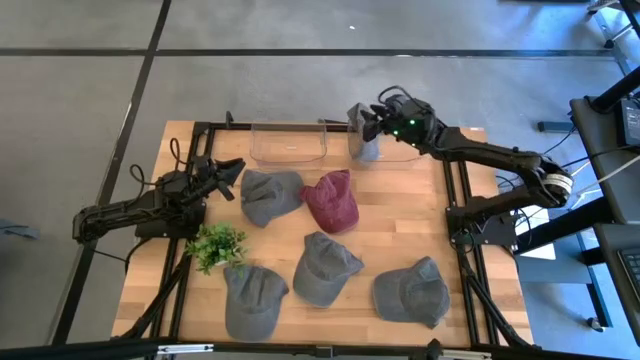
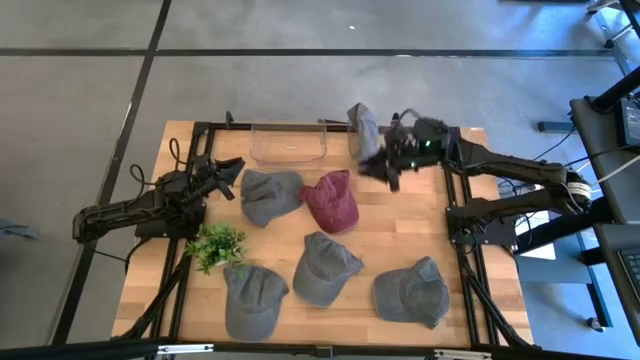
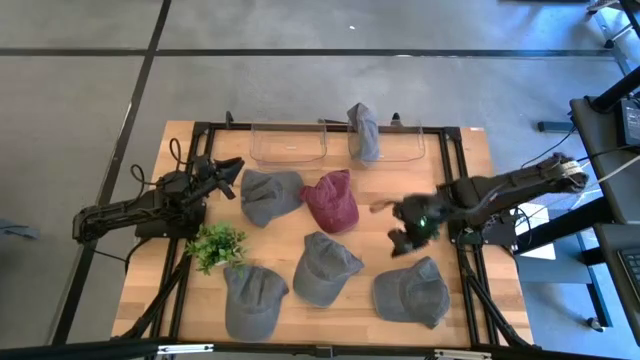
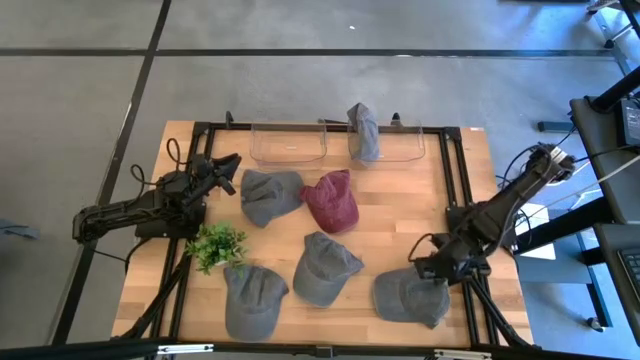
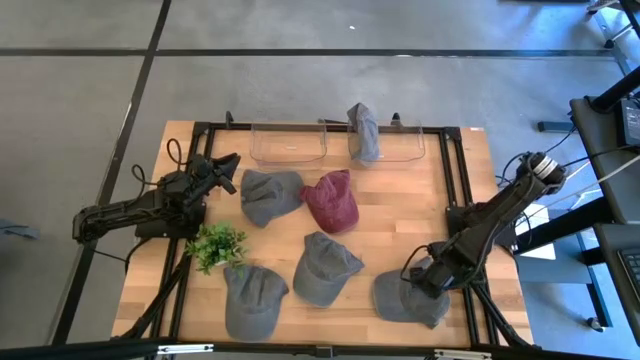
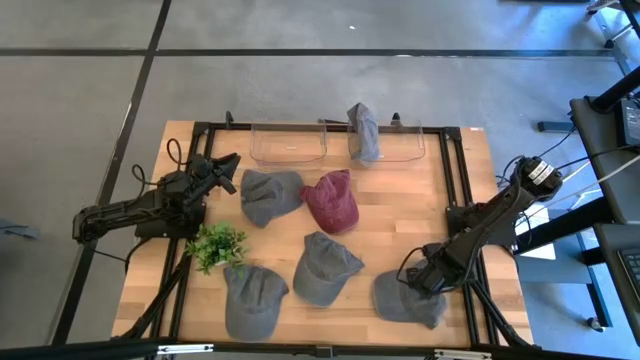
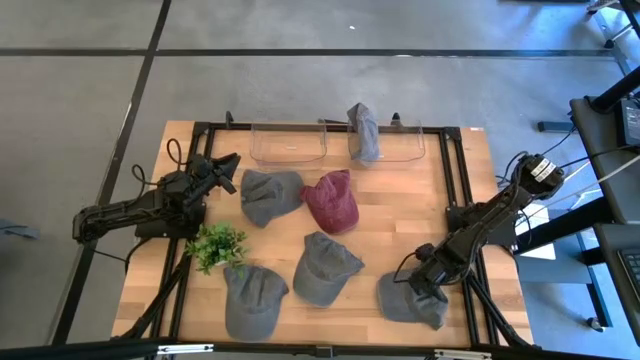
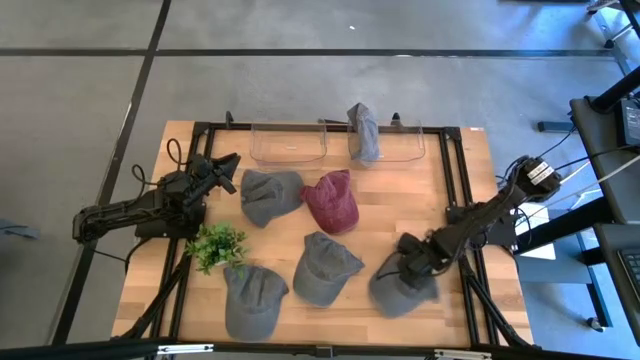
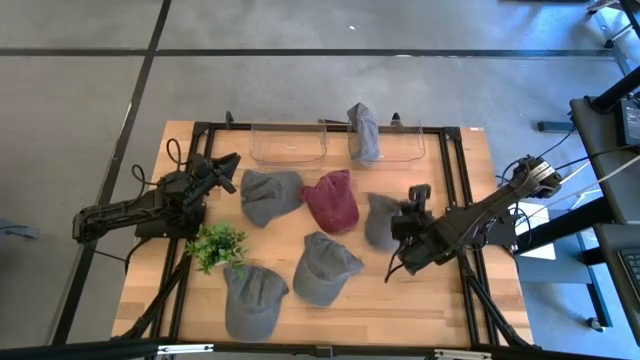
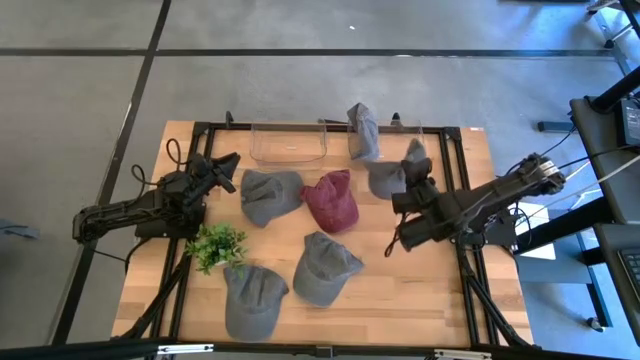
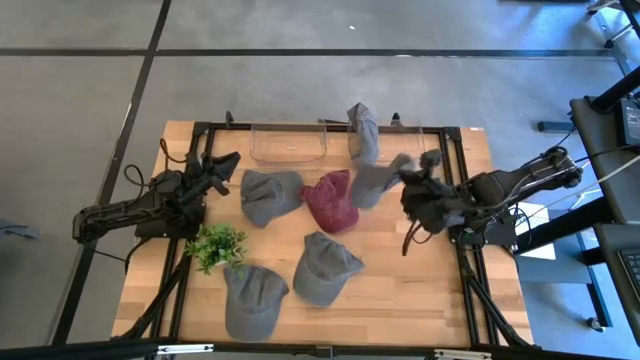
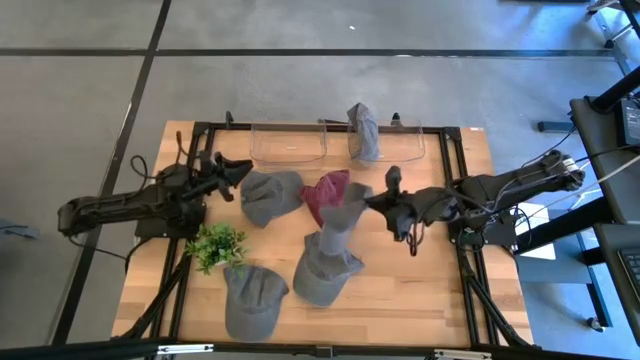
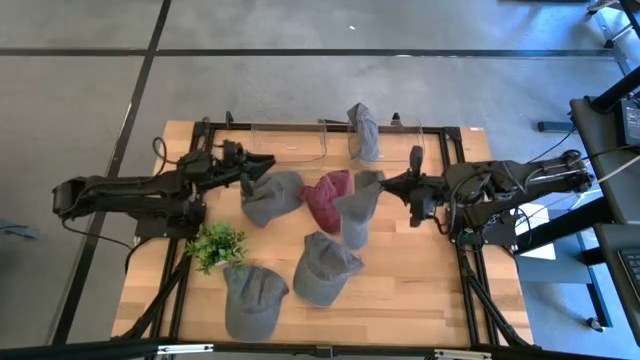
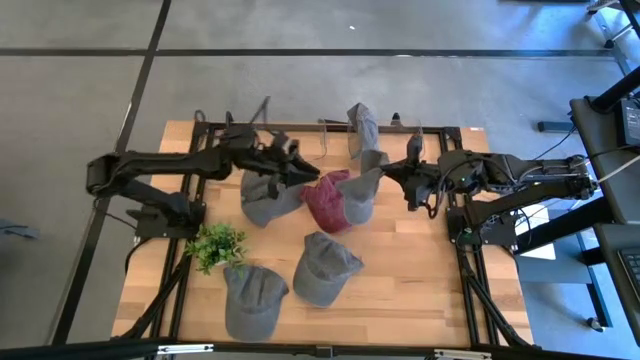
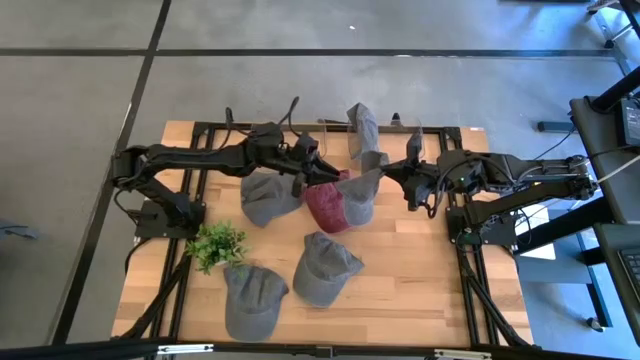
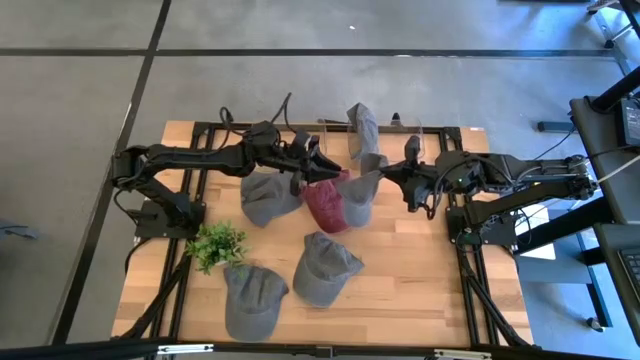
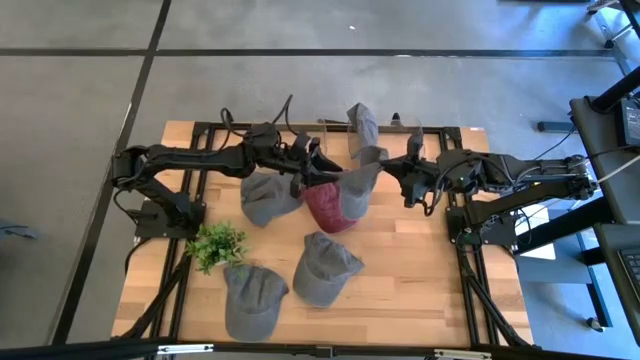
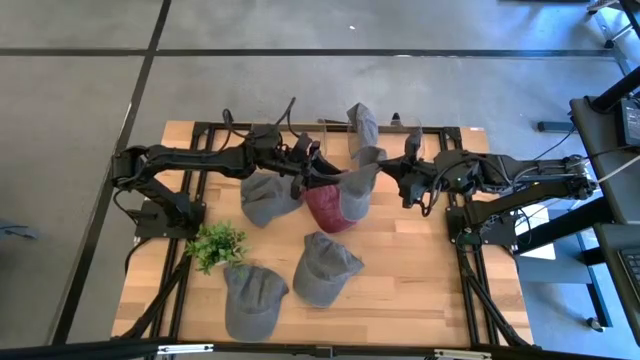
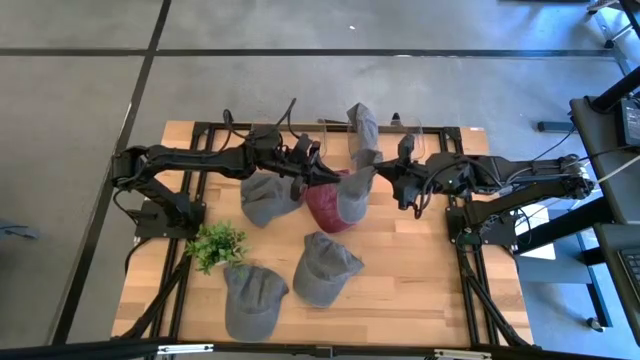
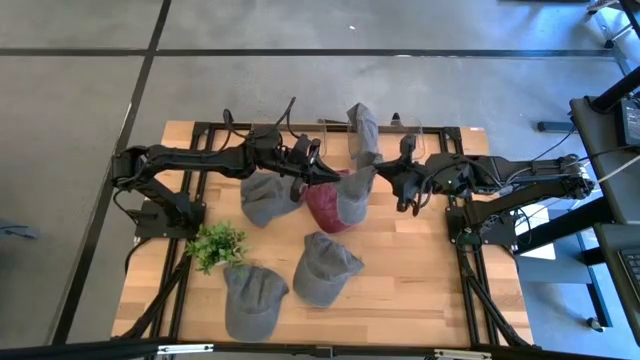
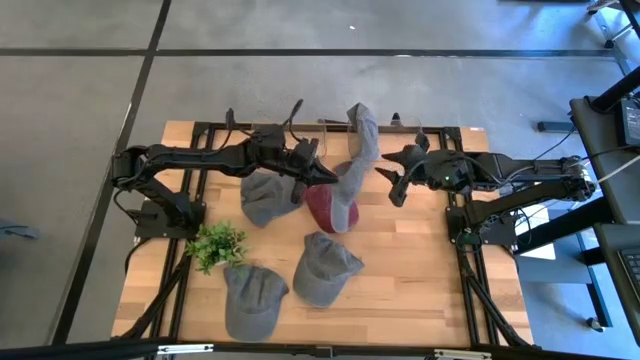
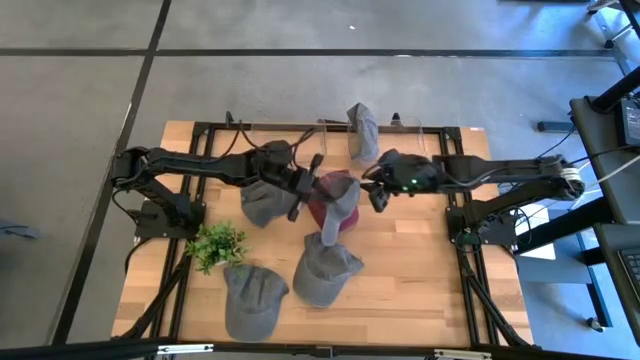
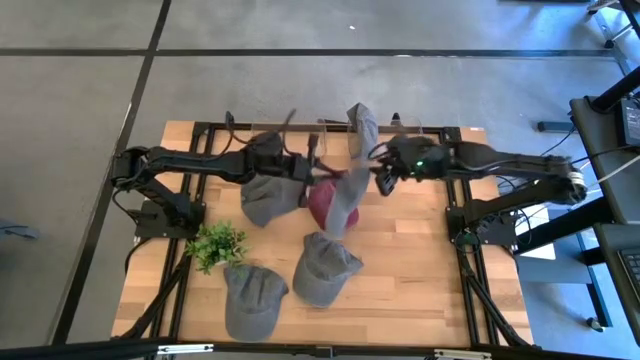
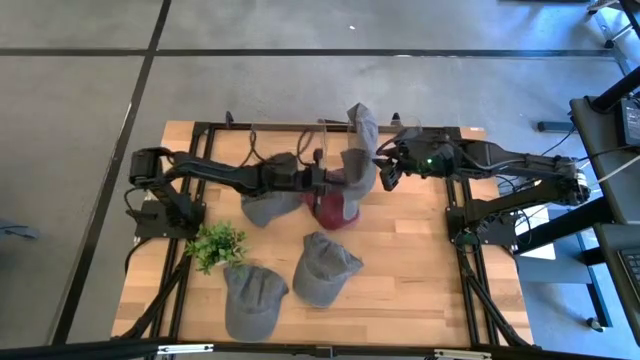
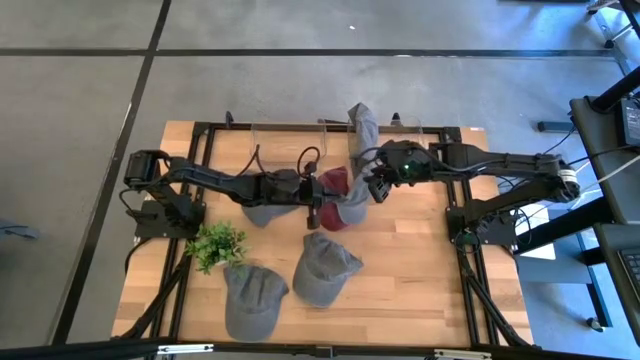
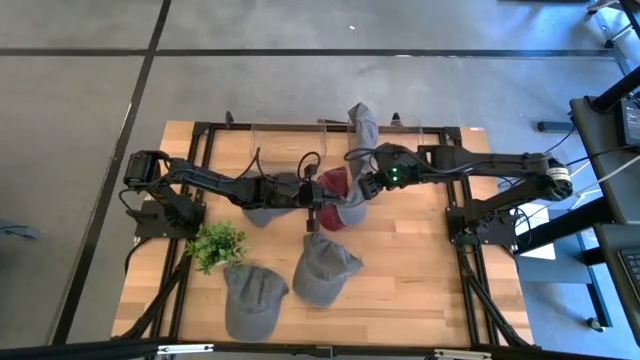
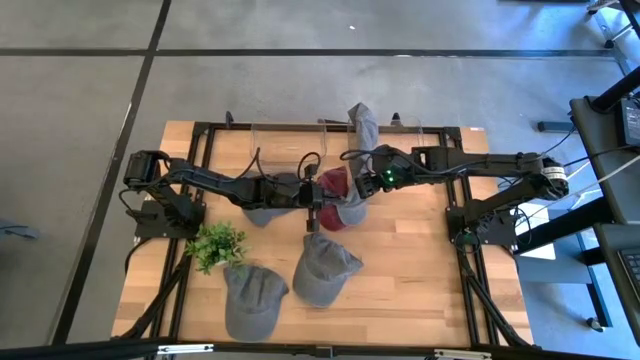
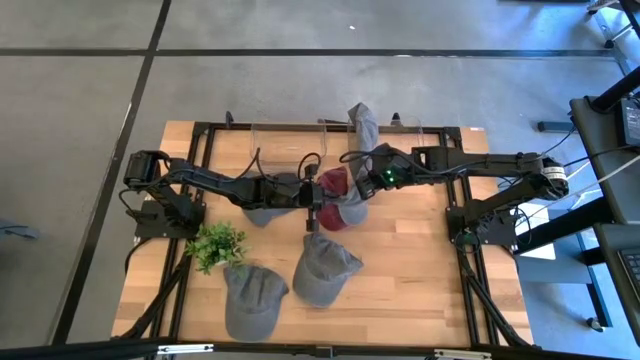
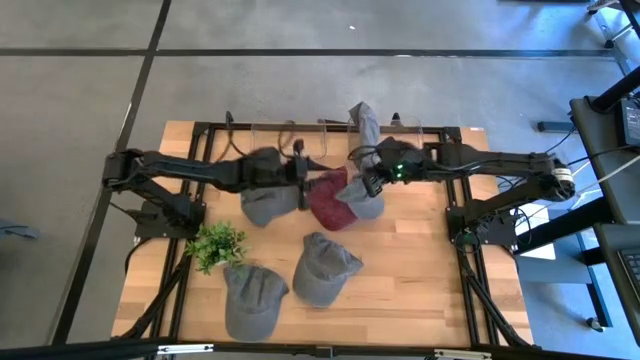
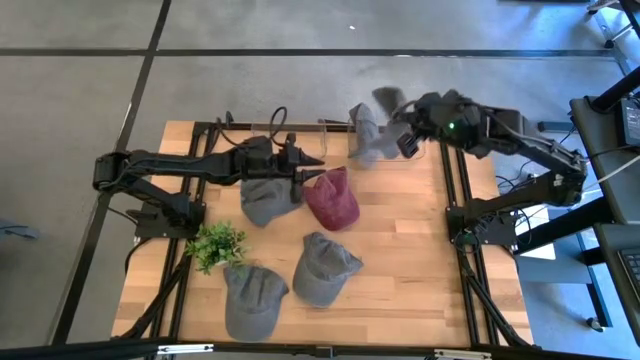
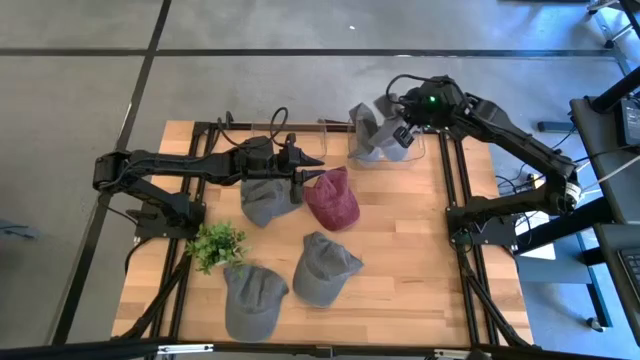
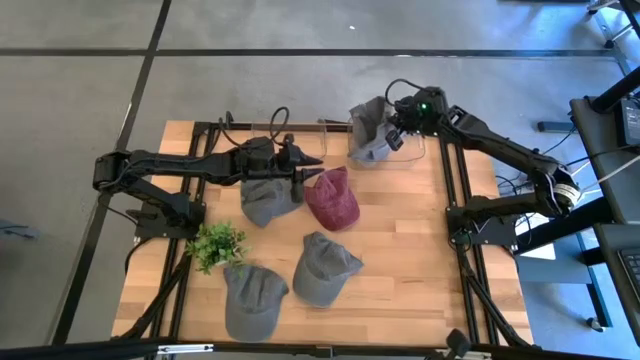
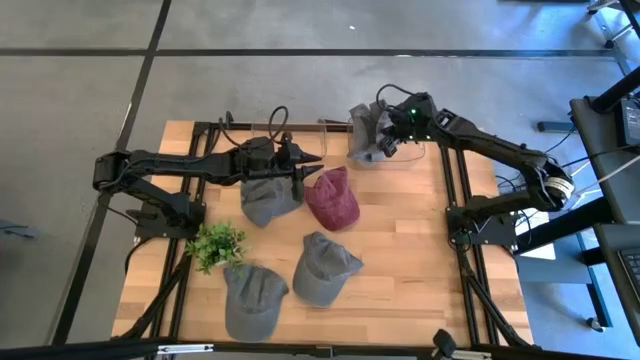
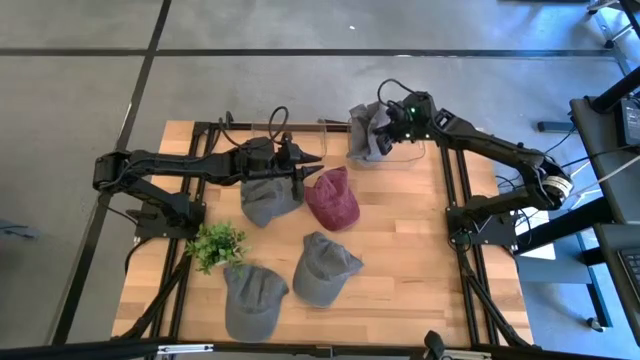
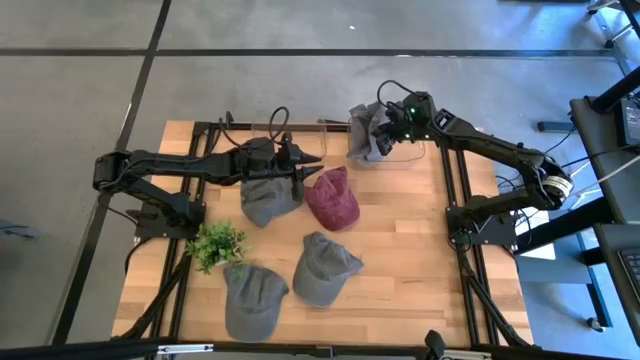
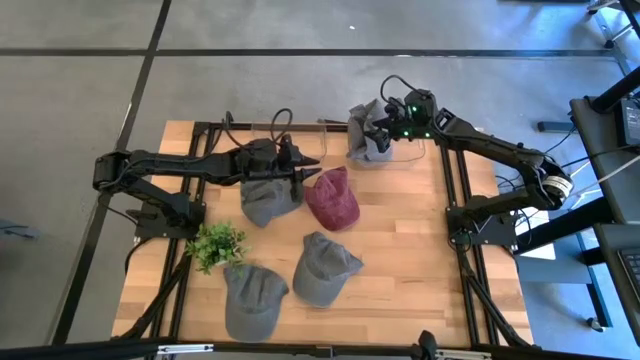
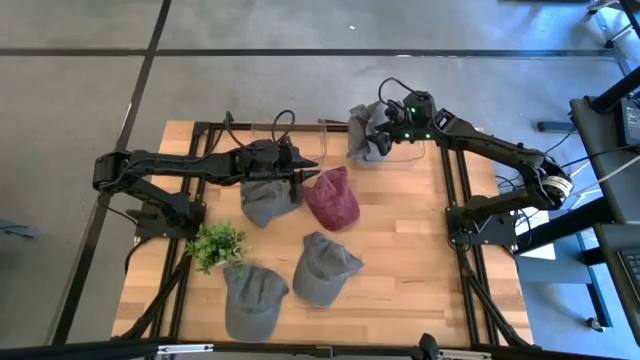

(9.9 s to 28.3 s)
Task: Pick & Place hat
Put the gray cap into the right transparent bin

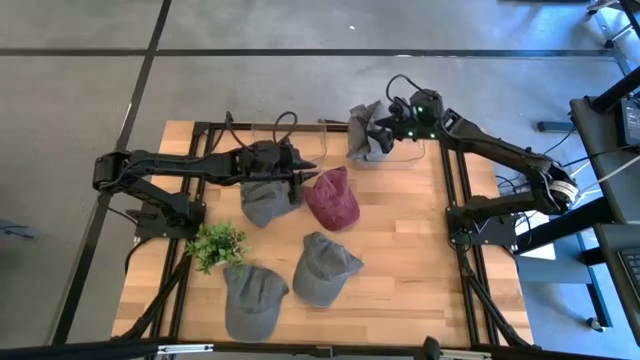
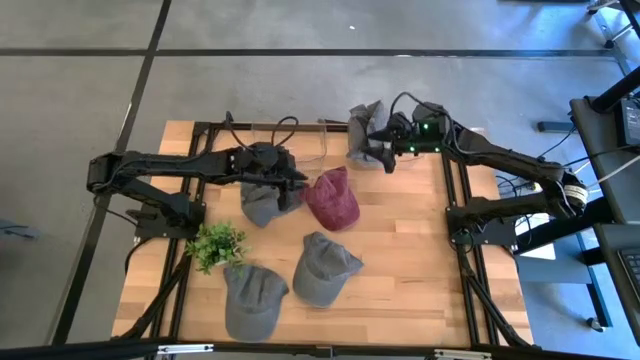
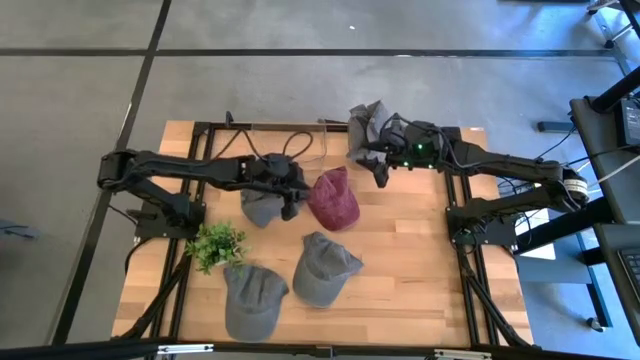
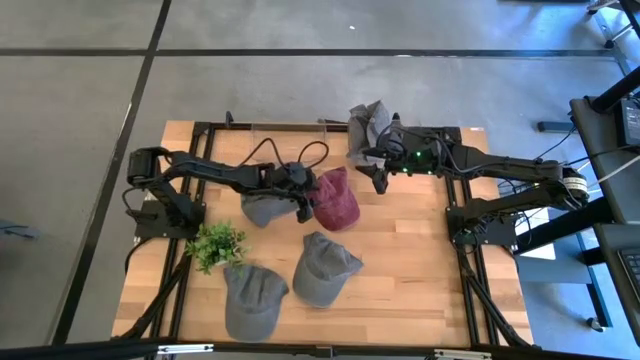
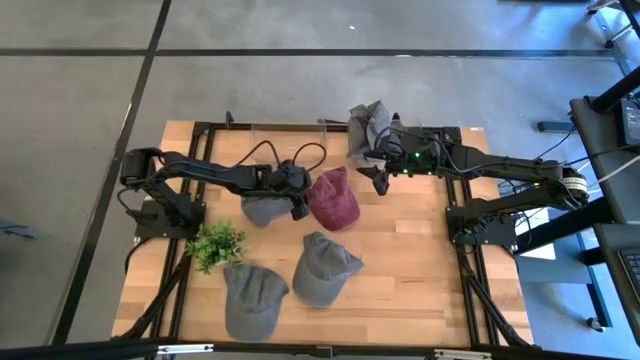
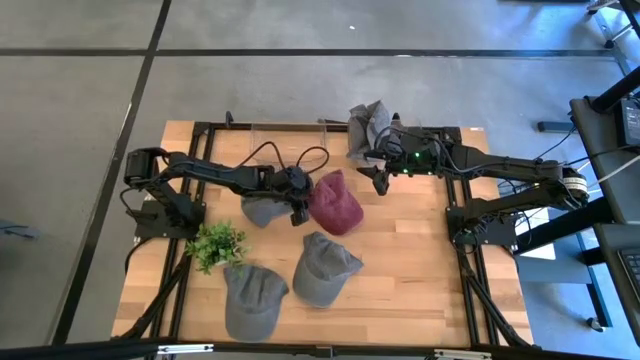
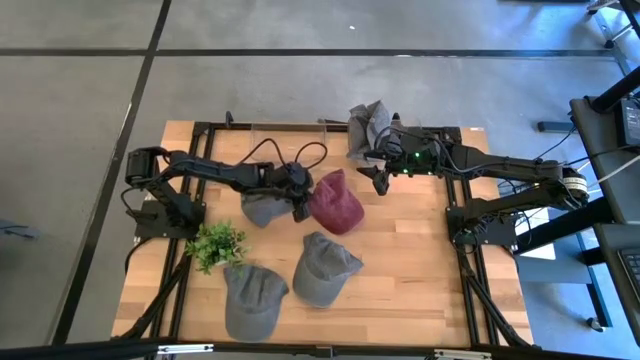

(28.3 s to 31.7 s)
Put the red cap into the left transparent bin
